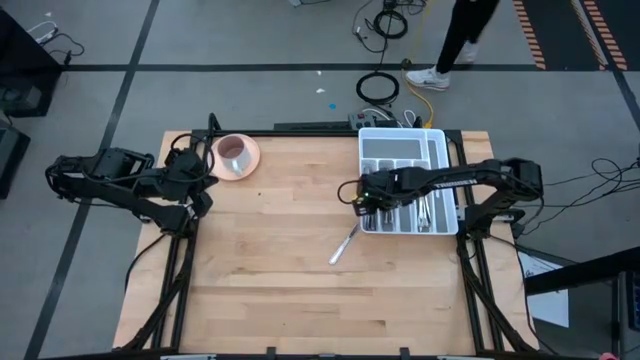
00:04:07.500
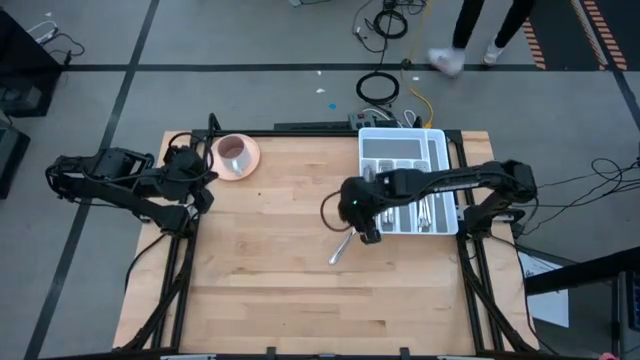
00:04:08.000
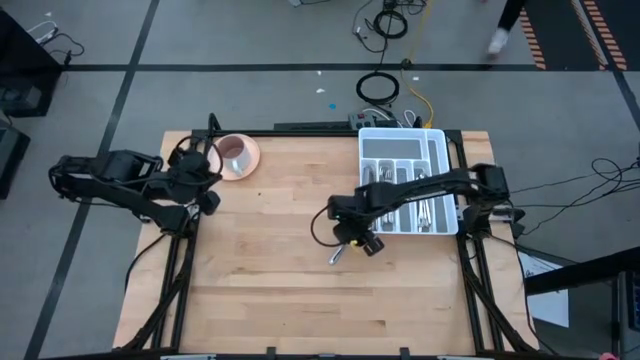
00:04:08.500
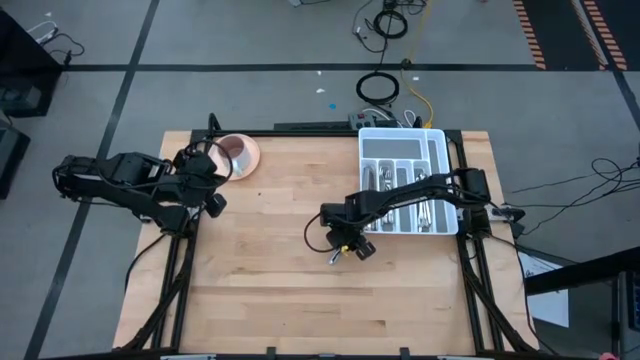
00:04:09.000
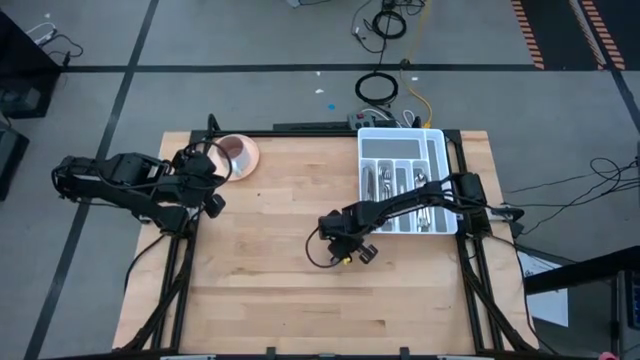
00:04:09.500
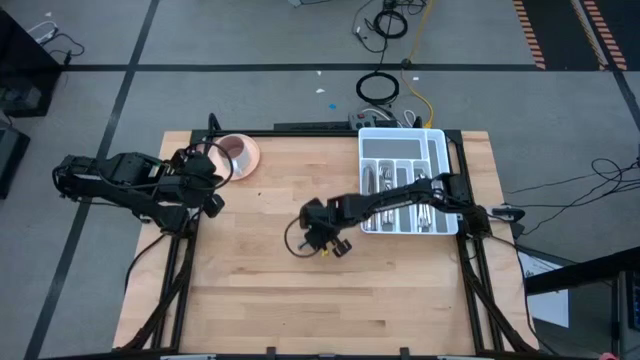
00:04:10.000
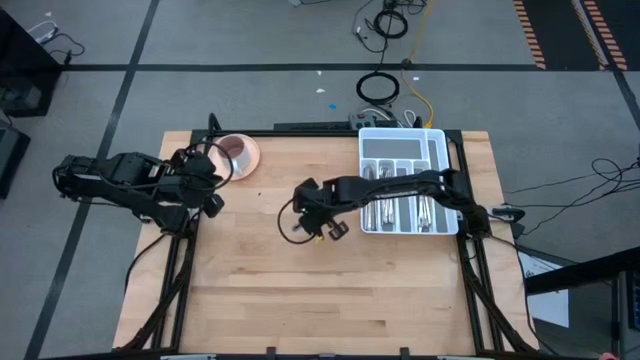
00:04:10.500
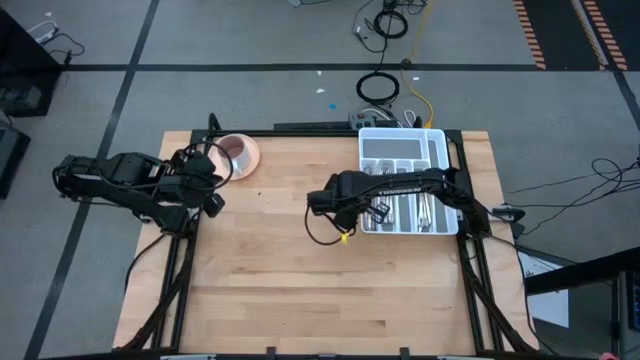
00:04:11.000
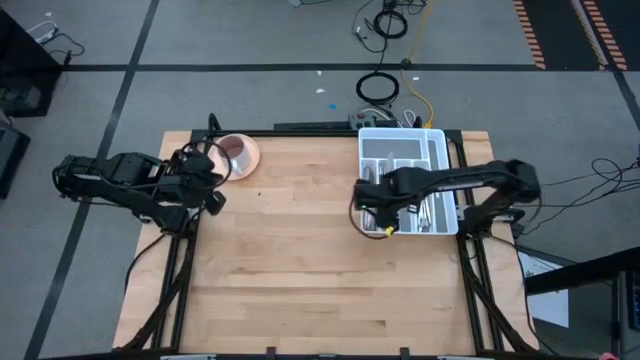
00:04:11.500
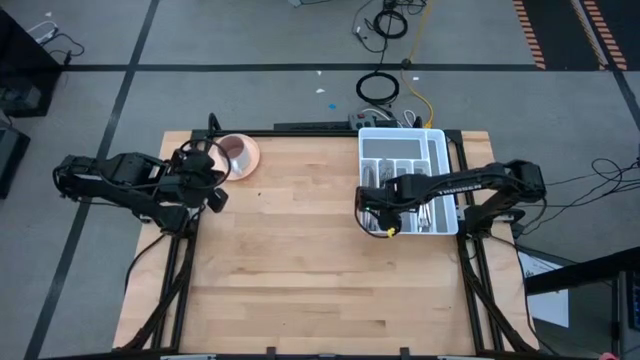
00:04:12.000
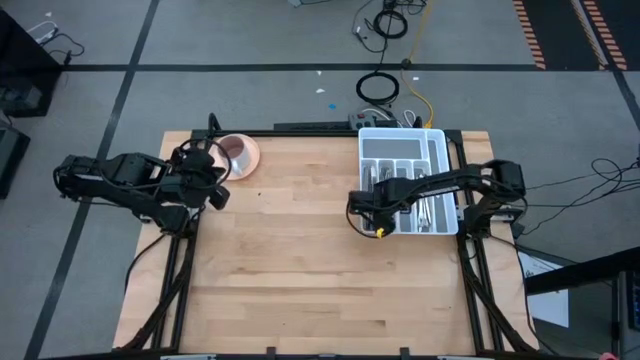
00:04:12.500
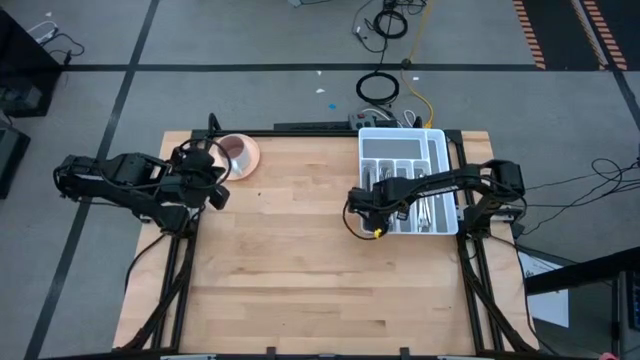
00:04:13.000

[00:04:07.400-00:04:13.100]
Task: Sort silverware
Put the silver knife into the white silverware tray

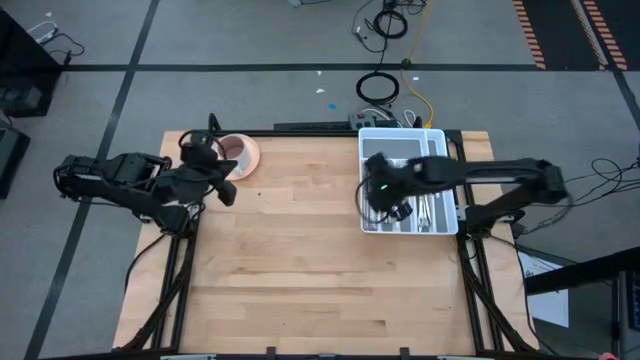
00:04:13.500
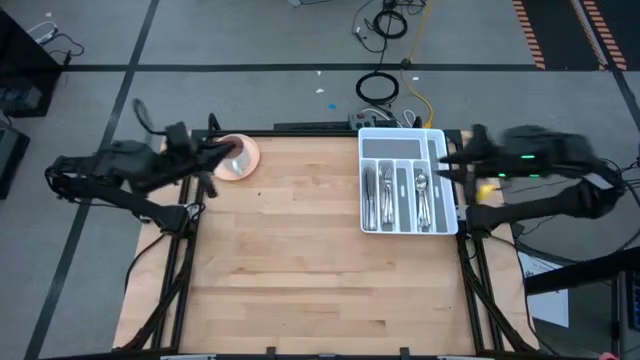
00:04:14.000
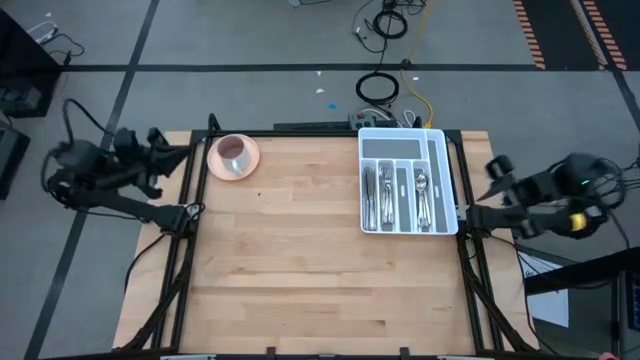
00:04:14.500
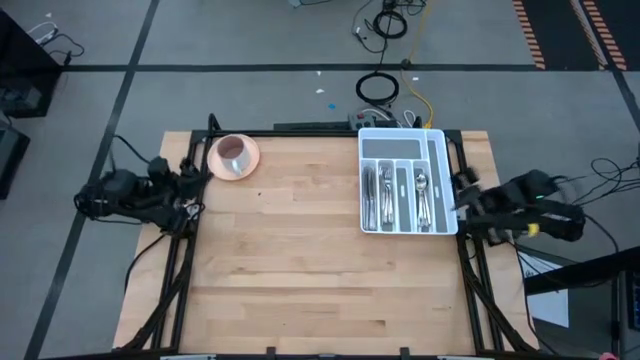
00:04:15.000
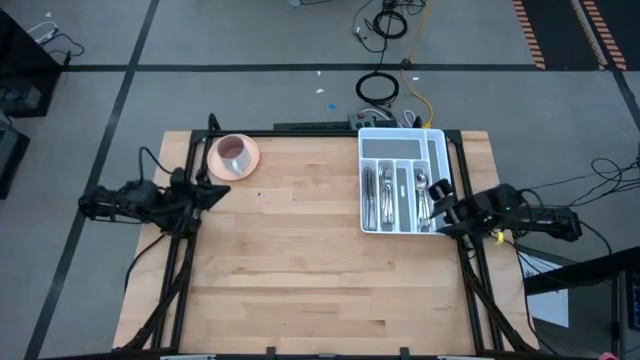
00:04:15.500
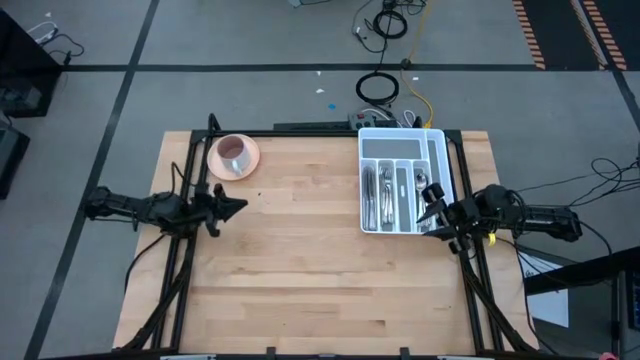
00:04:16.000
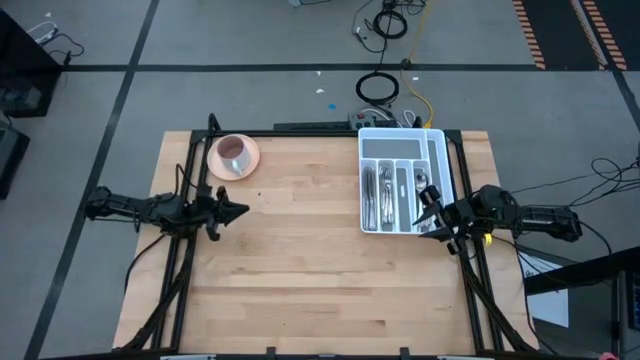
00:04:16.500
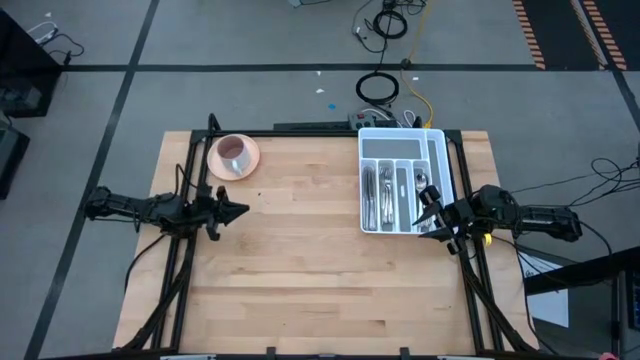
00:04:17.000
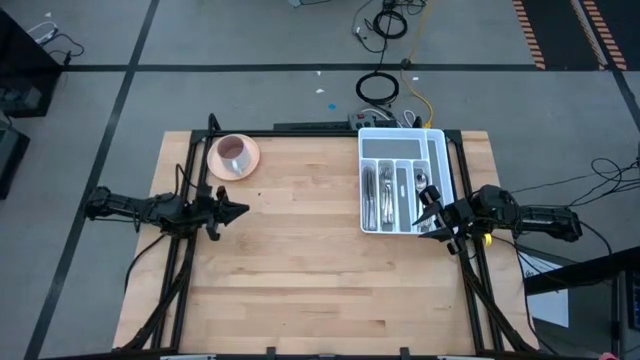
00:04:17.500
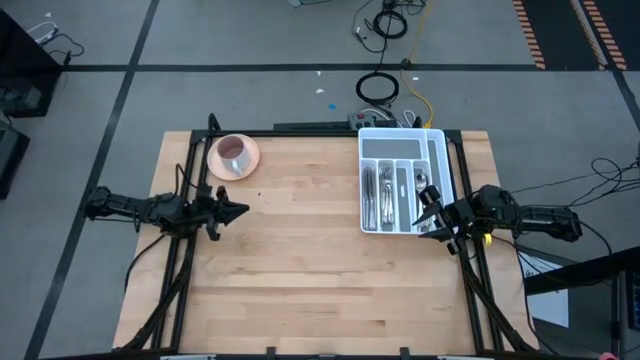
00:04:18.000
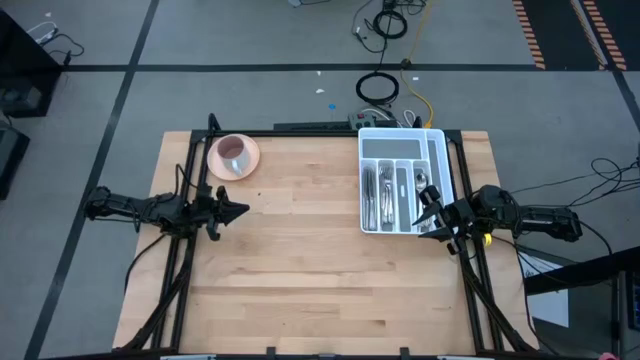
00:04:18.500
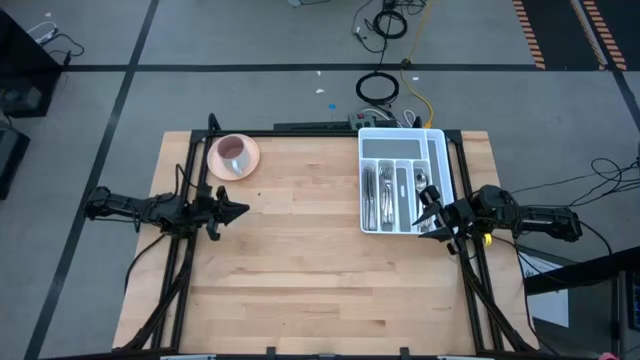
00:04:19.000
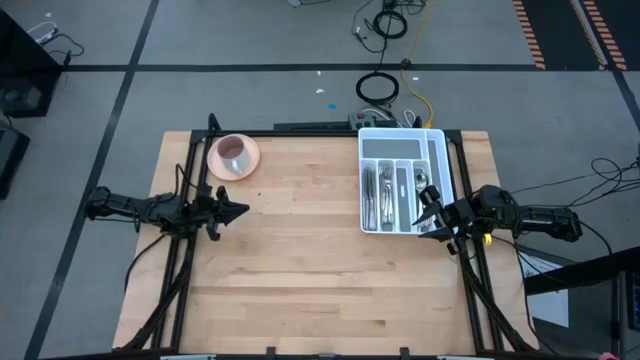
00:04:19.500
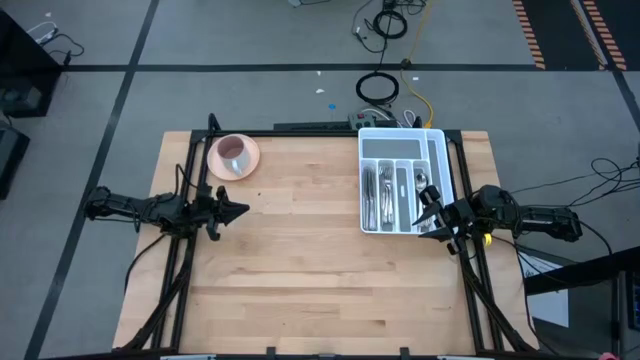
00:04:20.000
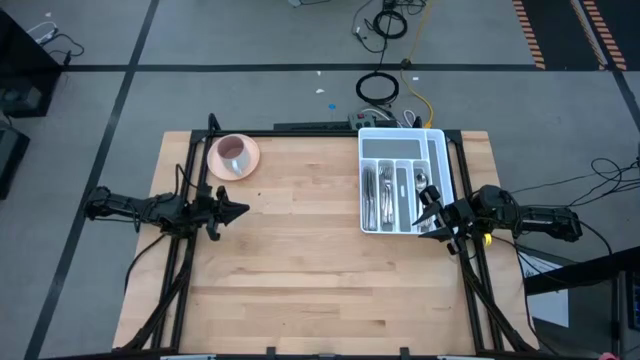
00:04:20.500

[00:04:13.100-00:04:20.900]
Return to Home Position

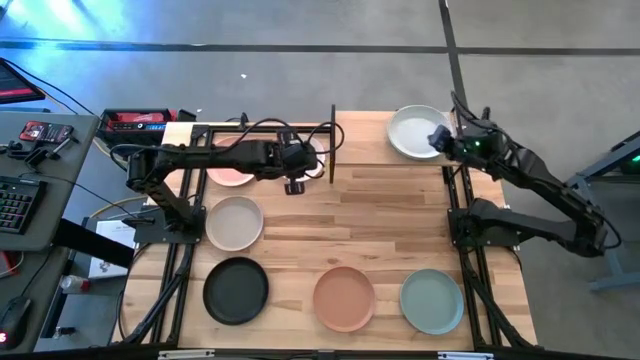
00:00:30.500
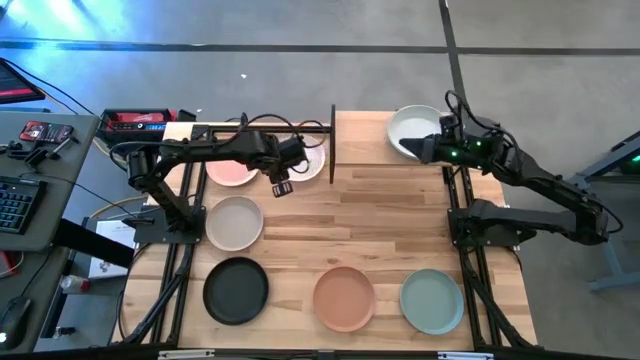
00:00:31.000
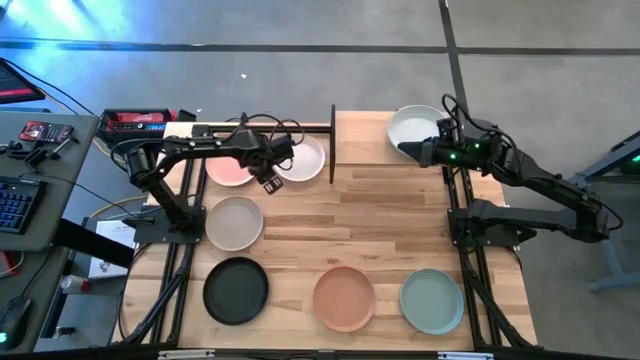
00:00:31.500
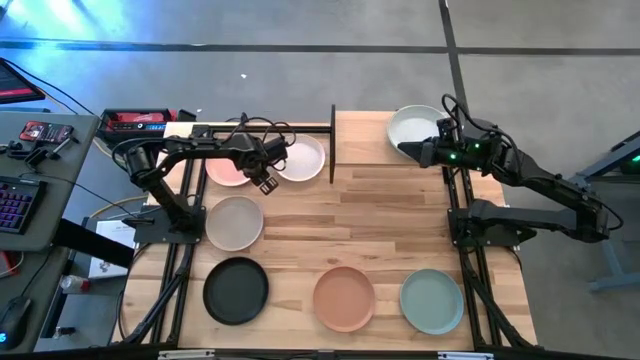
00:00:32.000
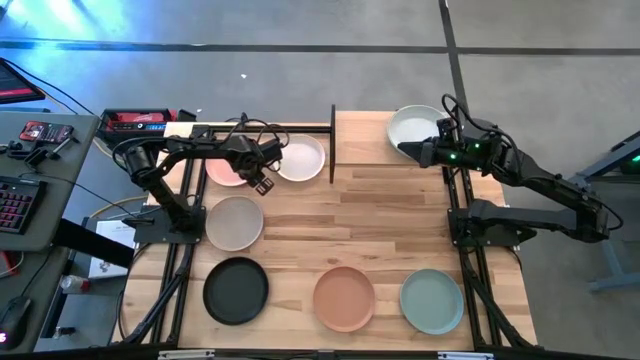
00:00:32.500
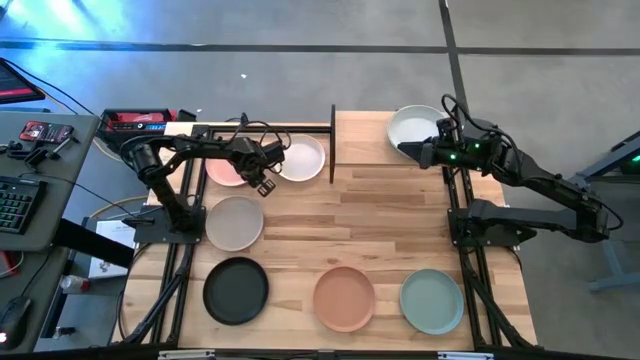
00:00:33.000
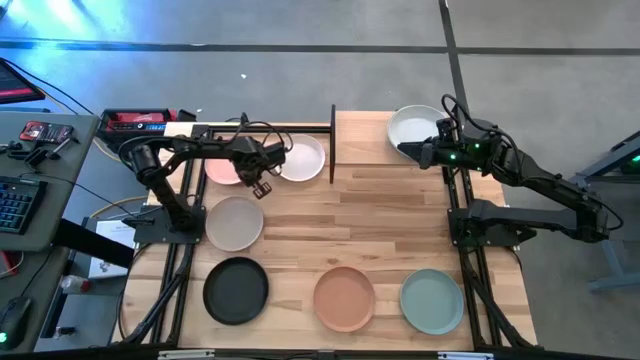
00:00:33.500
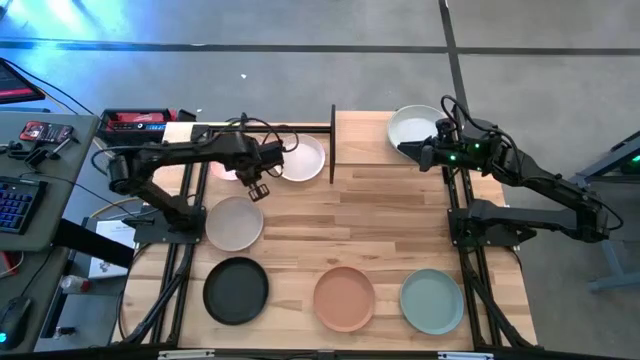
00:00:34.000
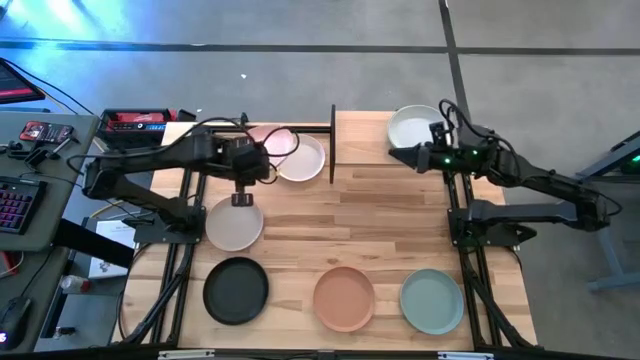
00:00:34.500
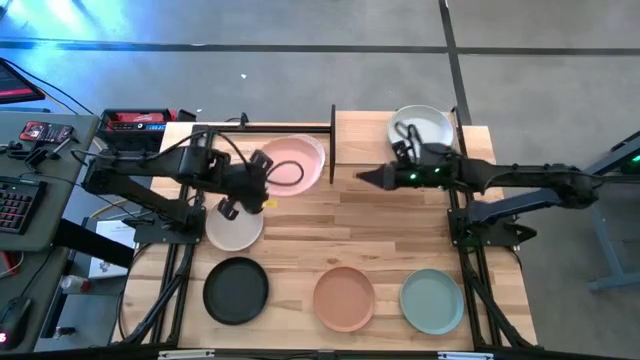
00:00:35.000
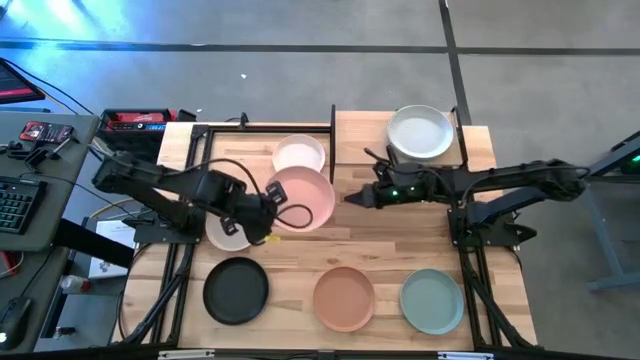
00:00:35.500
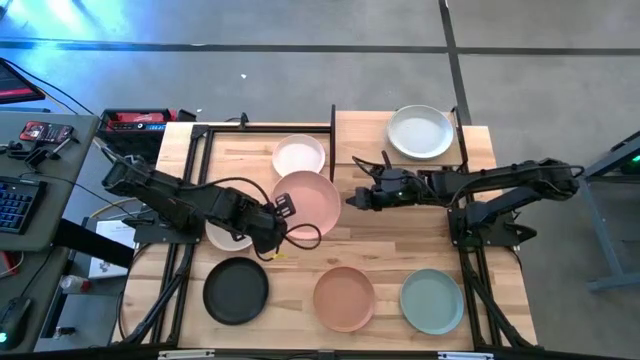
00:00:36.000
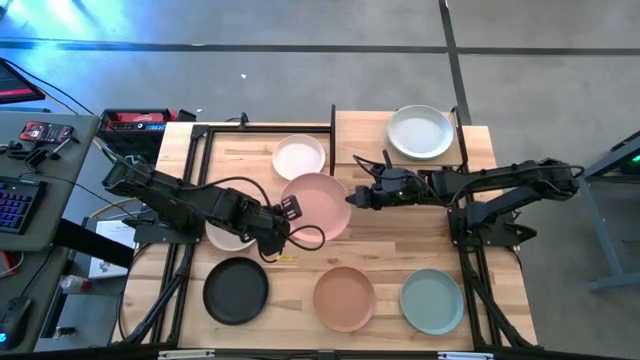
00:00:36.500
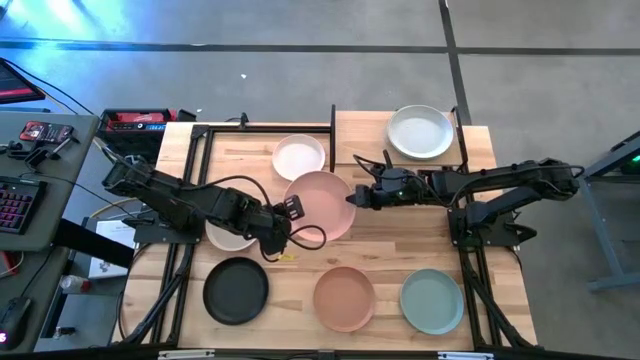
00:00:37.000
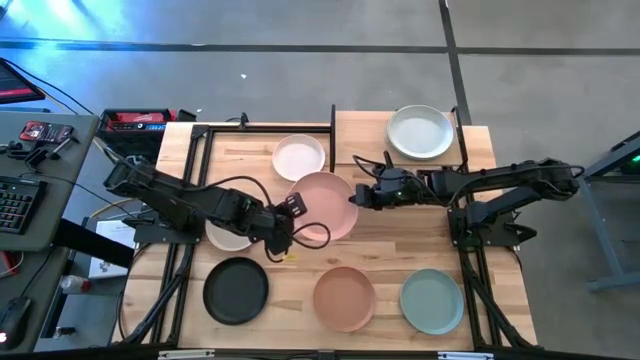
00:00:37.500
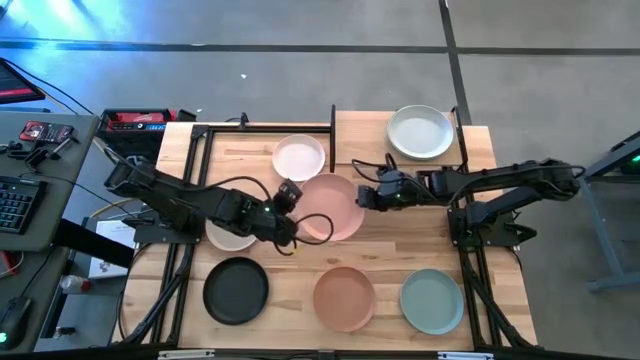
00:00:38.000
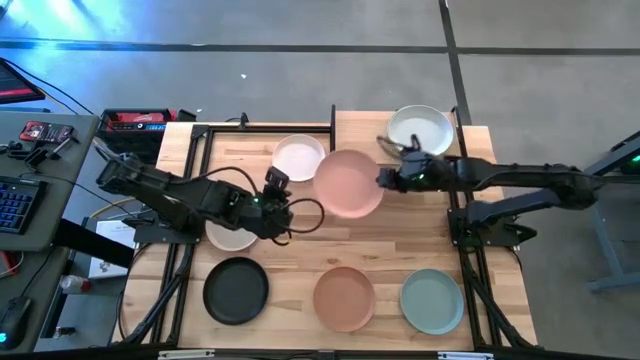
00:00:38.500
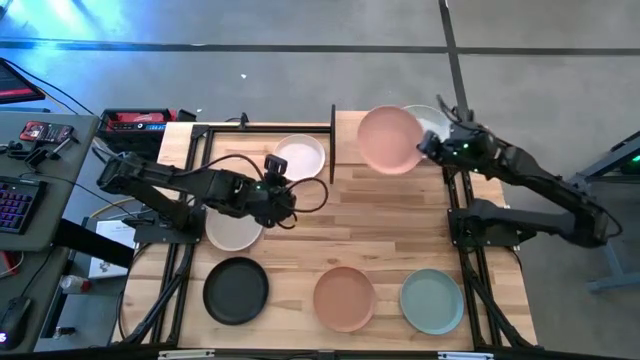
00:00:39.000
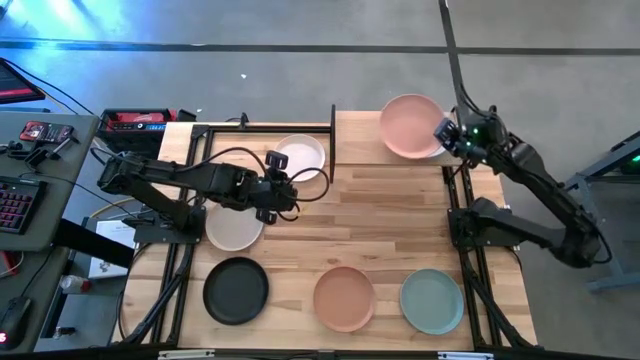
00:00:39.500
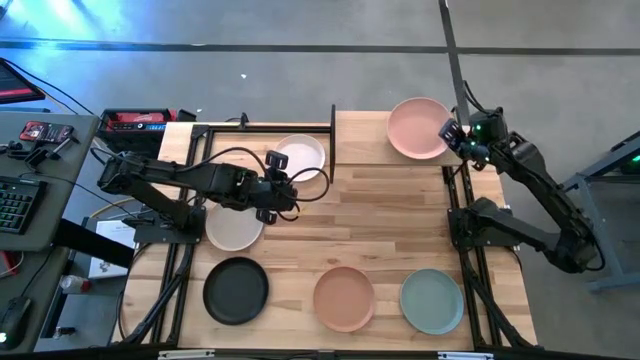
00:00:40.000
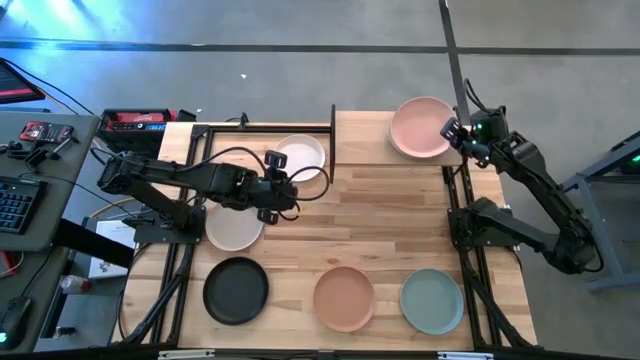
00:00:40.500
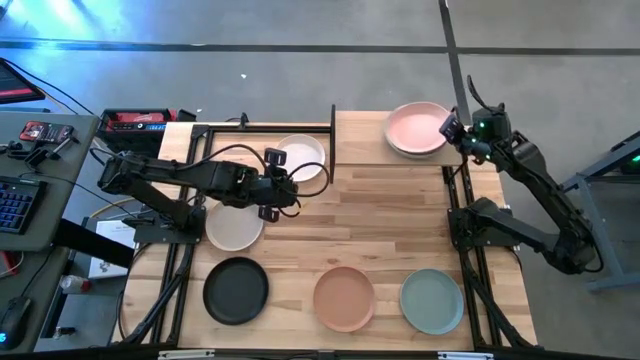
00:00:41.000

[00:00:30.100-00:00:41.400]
Task: Place and stack plates onto a shelf
Stack the light pink plate on top of the light gray plate on the shelf
